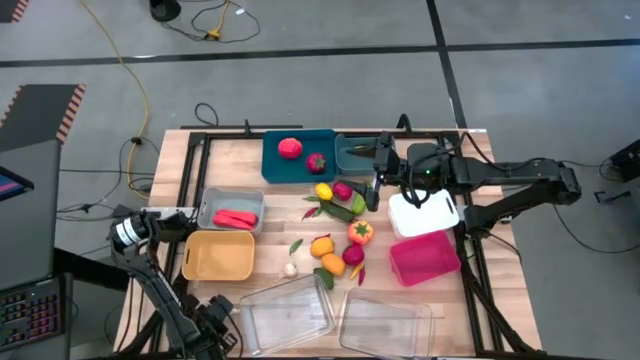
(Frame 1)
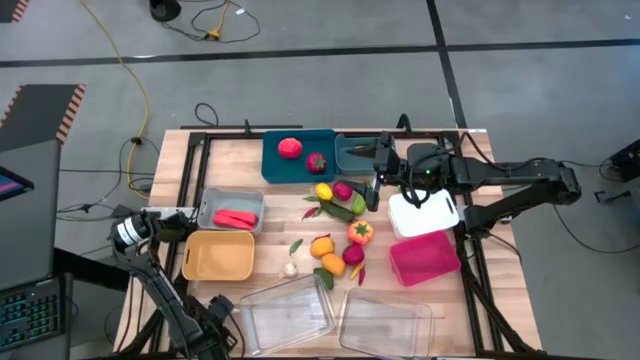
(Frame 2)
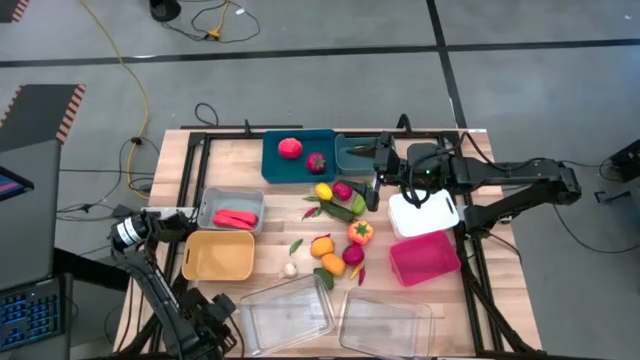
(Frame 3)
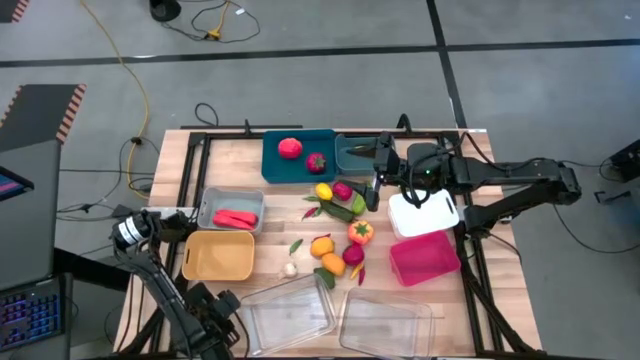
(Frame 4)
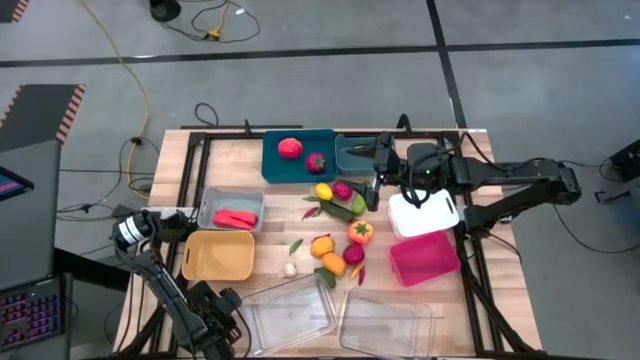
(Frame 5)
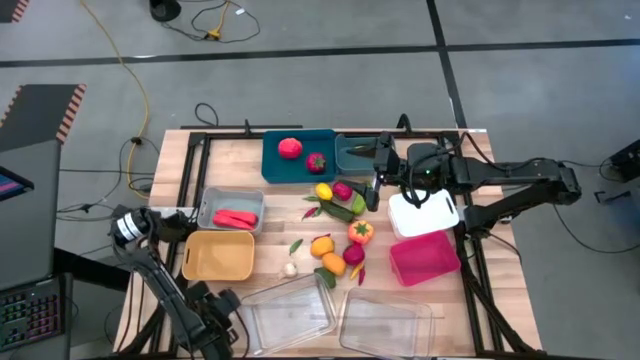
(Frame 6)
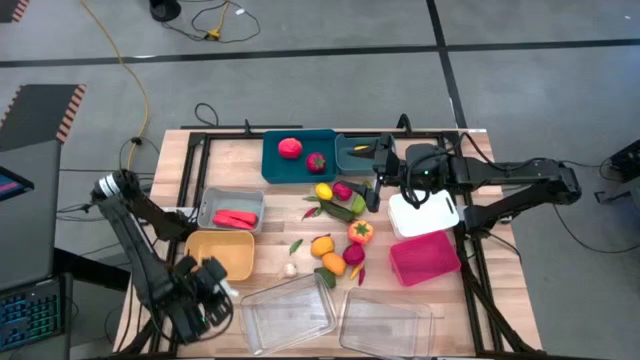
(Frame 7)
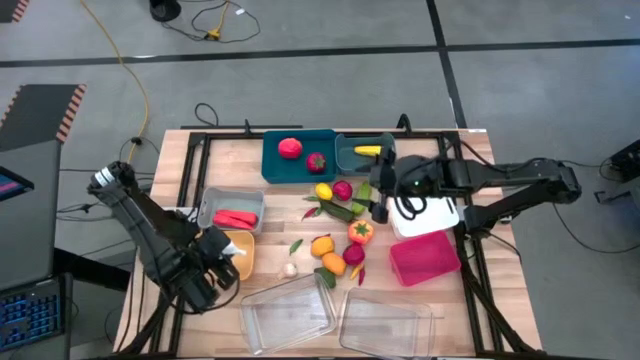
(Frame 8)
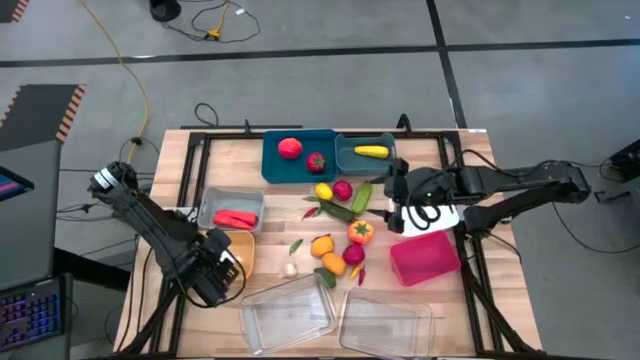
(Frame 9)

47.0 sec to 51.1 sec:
Task: Sort produce into baskets
Put the garlic into the yellow bin

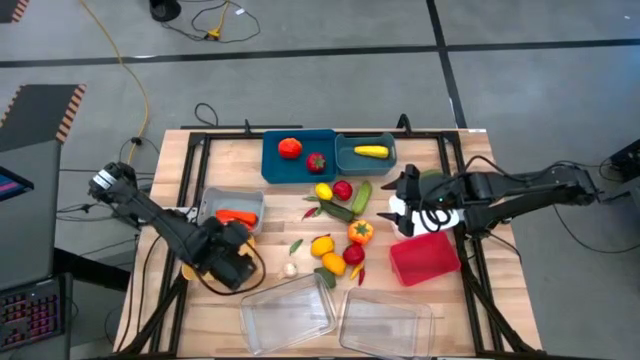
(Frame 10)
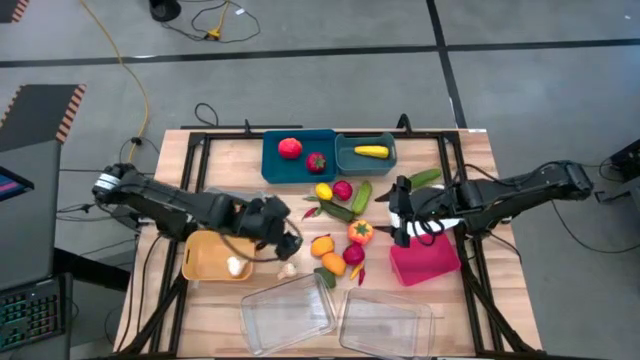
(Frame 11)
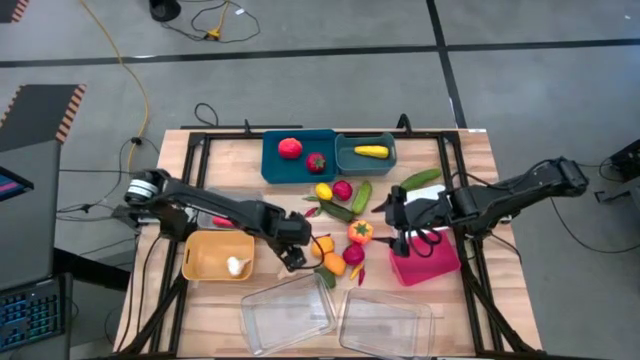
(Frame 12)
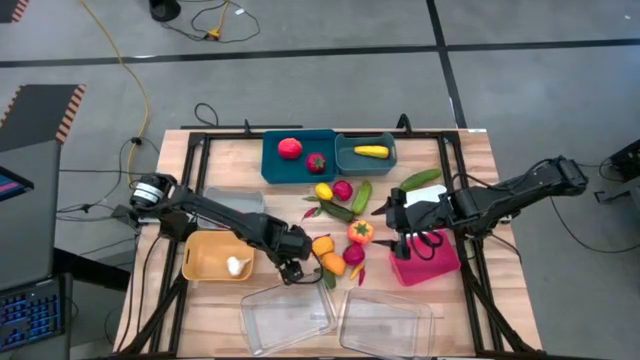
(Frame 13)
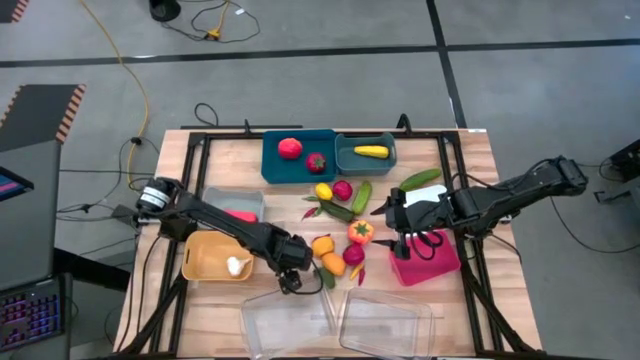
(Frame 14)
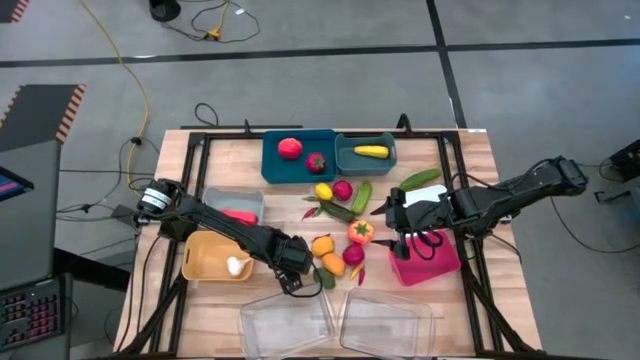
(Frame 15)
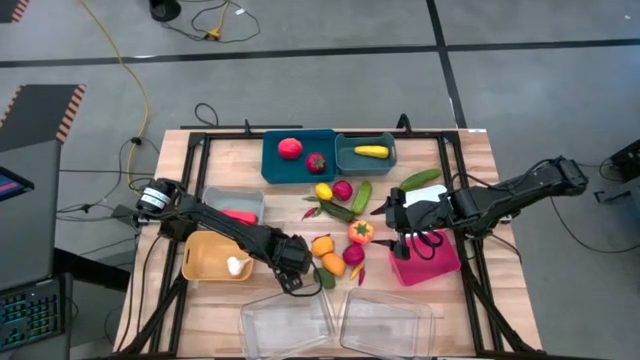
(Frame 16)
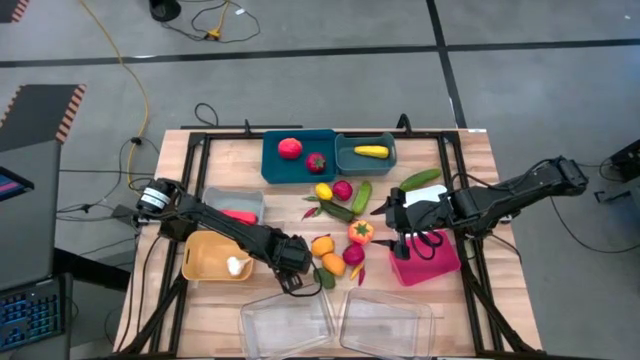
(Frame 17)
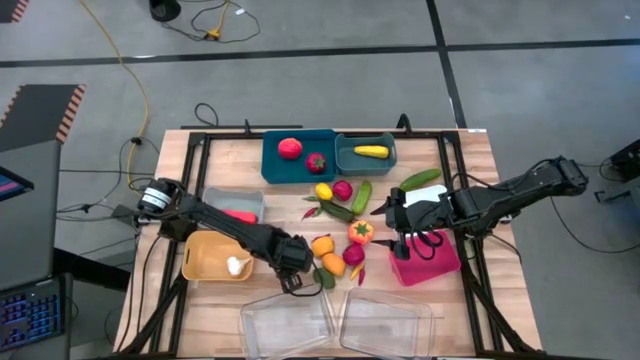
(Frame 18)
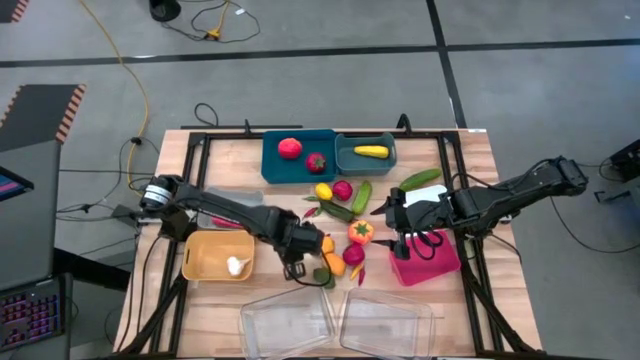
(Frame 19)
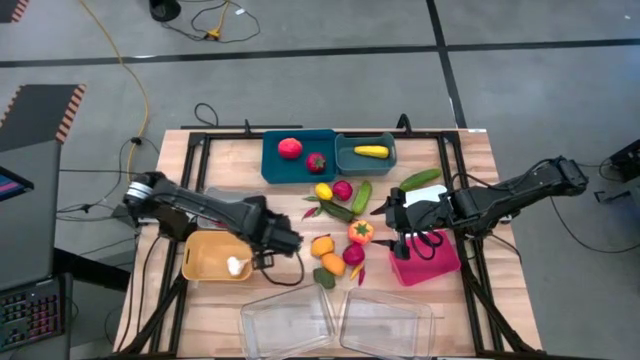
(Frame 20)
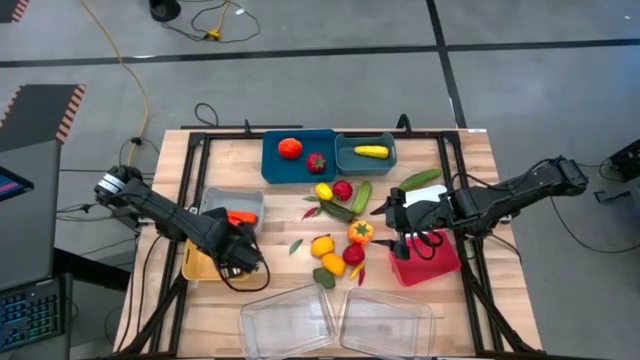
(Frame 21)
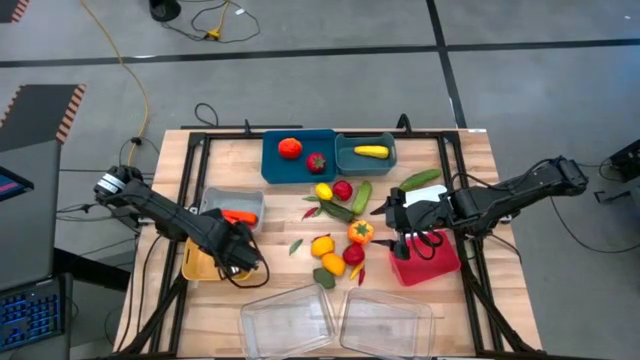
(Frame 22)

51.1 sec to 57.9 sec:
Put the garlic into the yellow bin

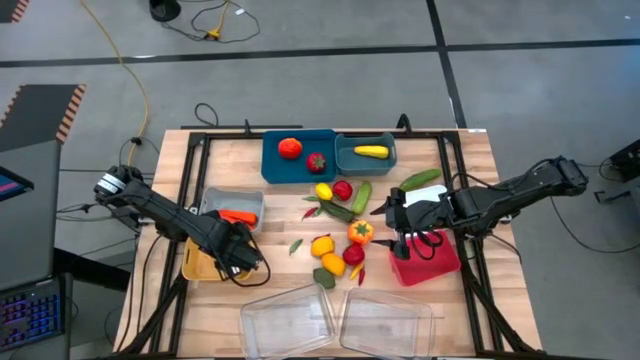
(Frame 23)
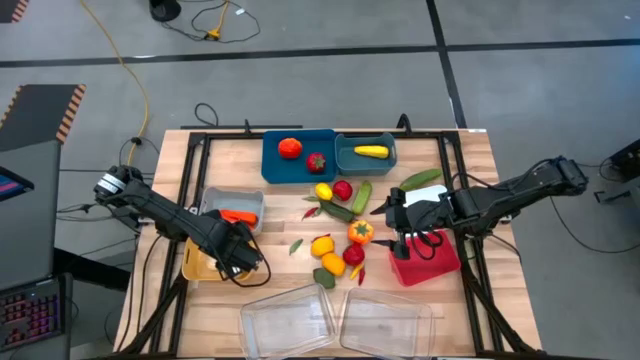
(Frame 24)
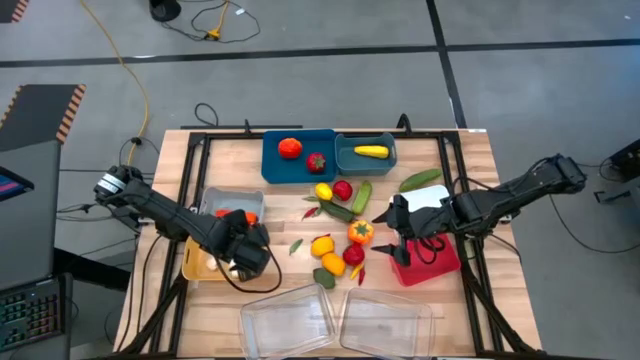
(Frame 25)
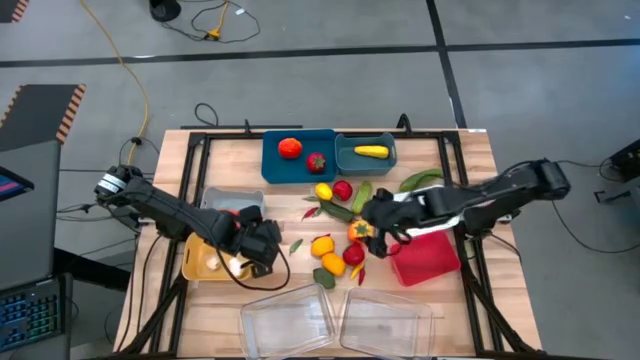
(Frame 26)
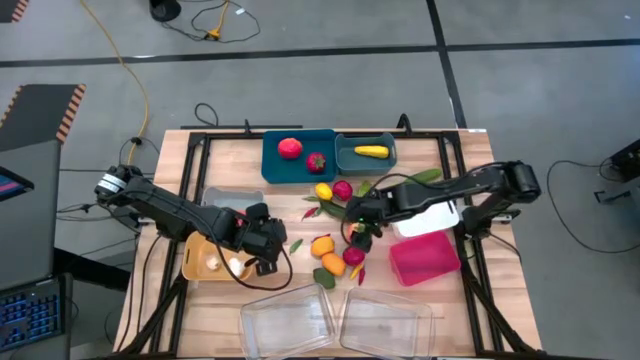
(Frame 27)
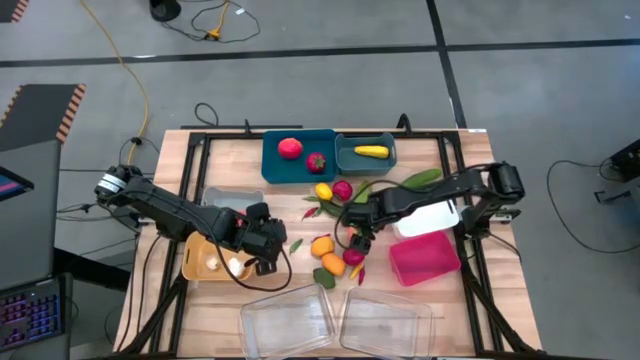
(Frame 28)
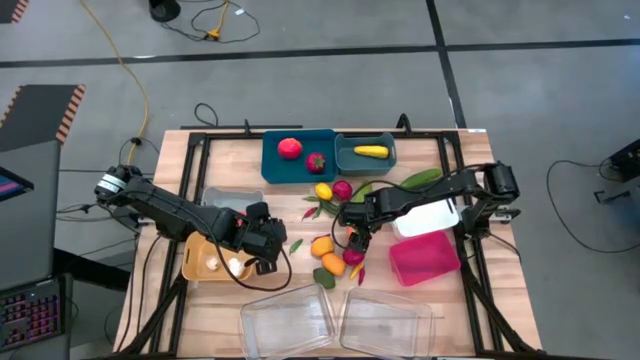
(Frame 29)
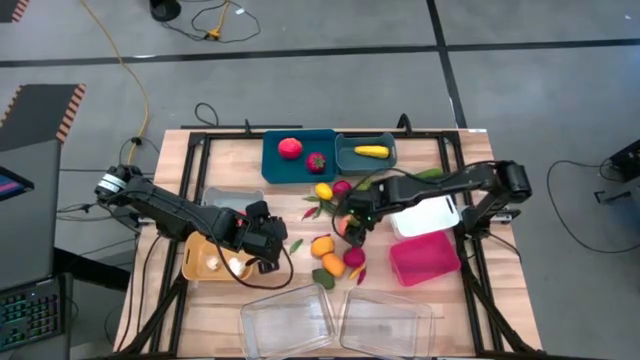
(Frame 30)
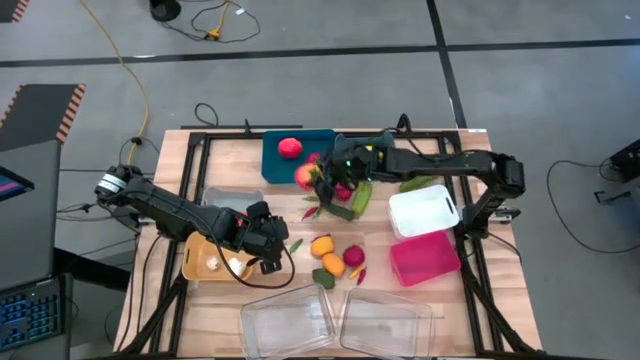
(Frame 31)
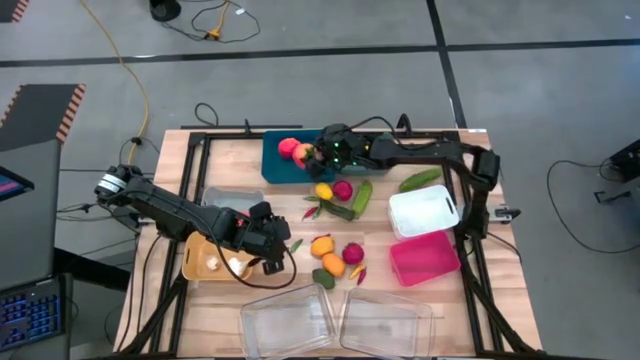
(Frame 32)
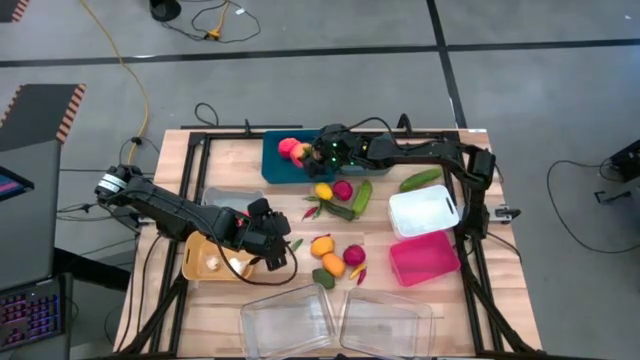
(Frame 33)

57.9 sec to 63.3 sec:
Put the tomato into the blue bin

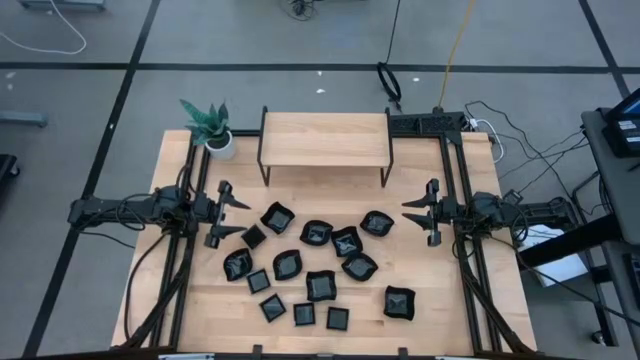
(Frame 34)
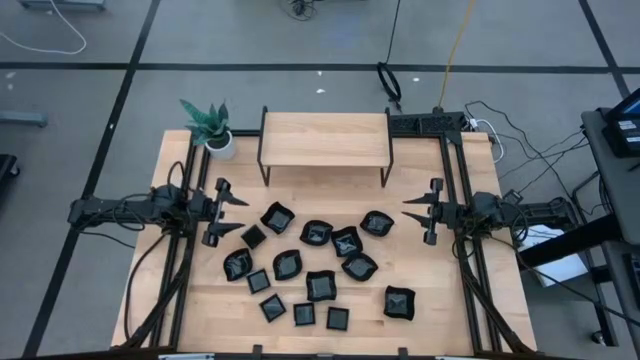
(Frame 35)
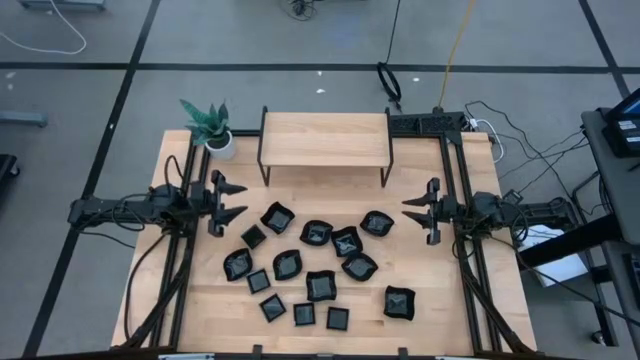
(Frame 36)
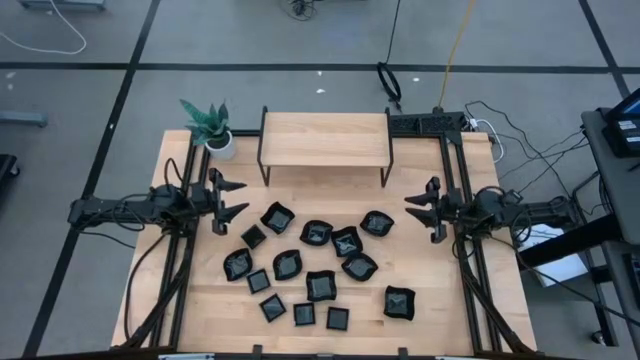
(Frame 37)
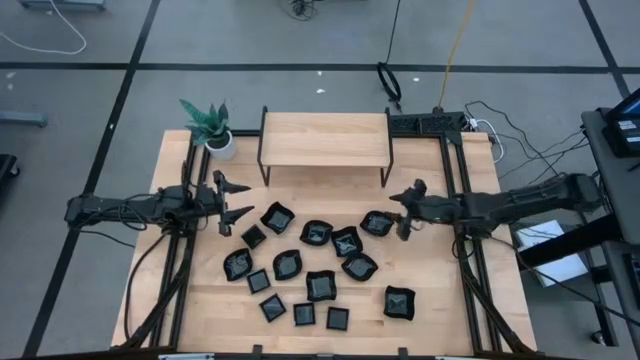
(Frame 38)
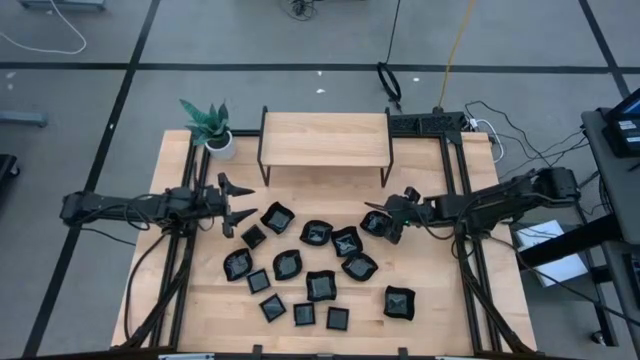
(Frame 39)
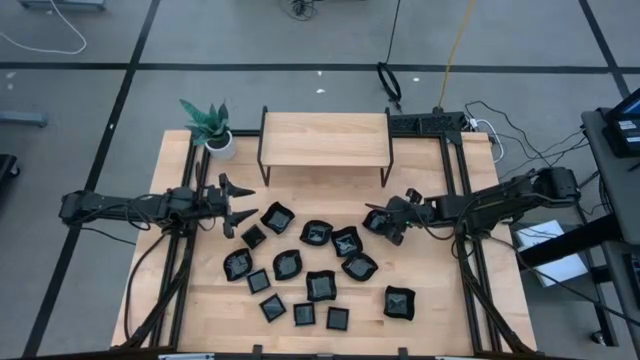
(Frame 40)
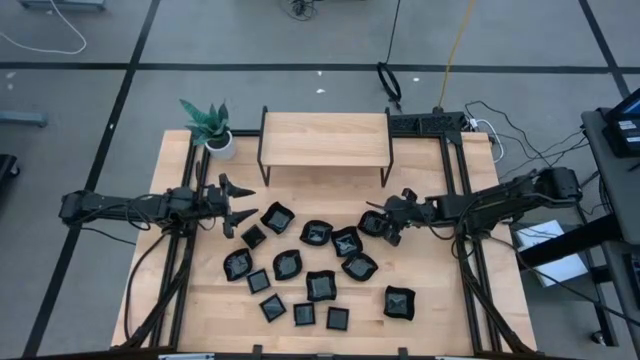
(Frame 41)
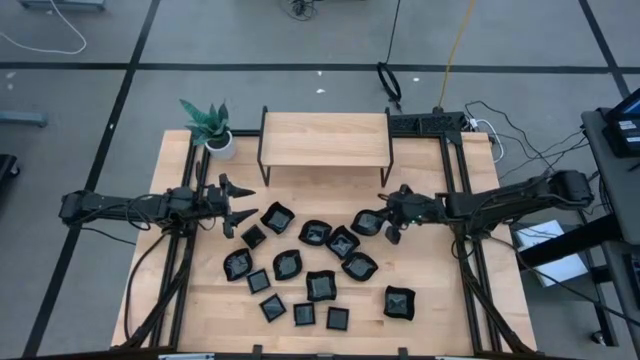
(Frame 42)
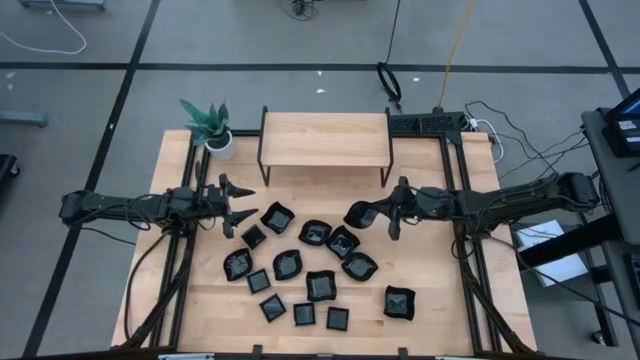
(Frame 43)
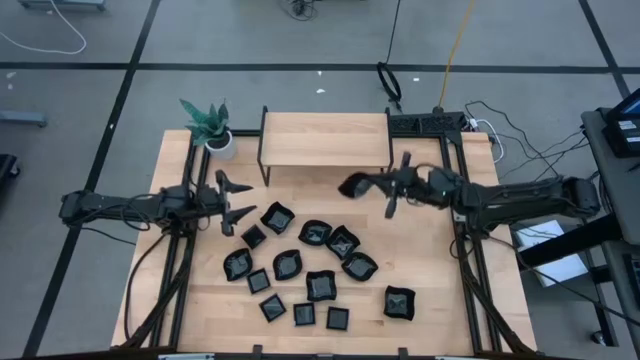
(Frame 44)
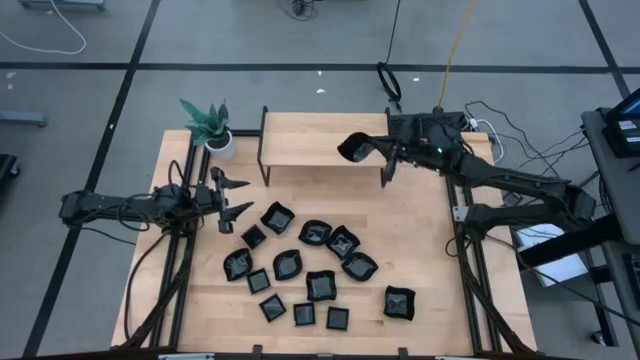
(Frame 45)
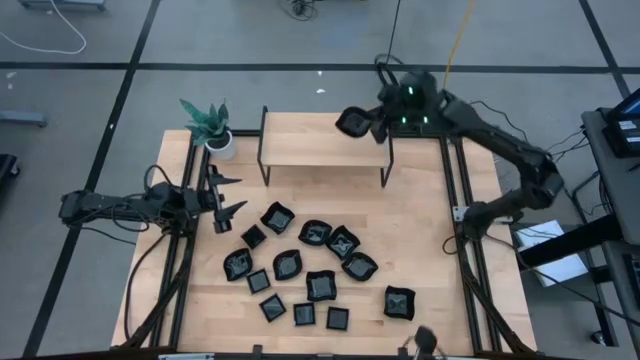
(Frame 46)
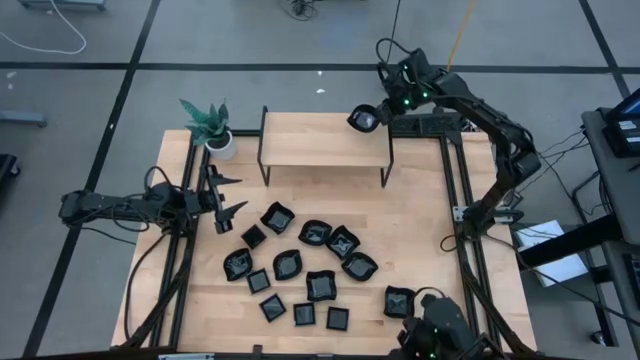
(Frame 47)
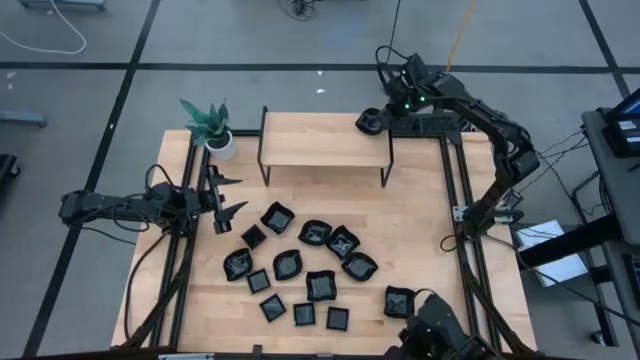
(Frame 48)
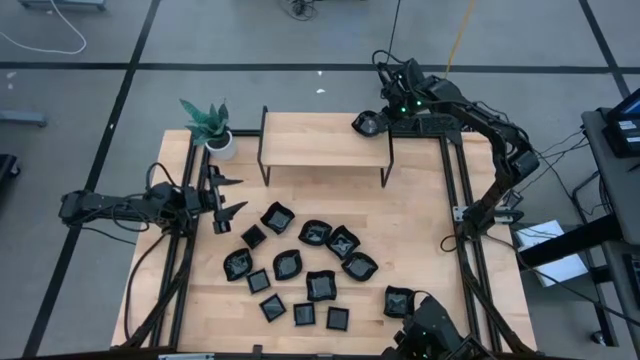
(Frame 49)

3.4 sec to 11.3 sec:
Task: Pick & Place Mini shaped plates
Put the black leaf-shaped plate on the shelf
